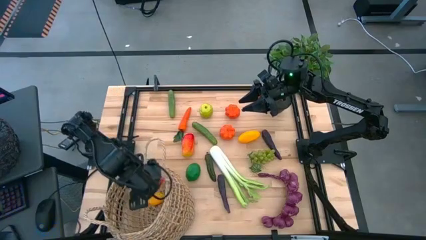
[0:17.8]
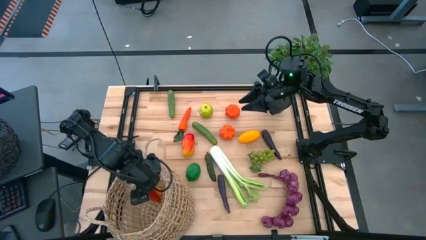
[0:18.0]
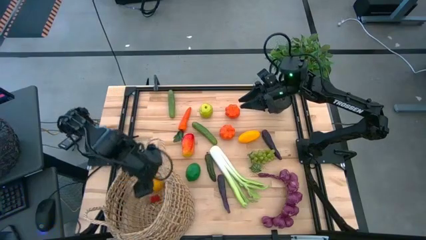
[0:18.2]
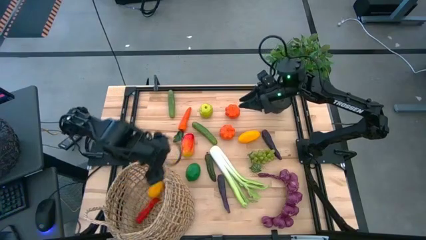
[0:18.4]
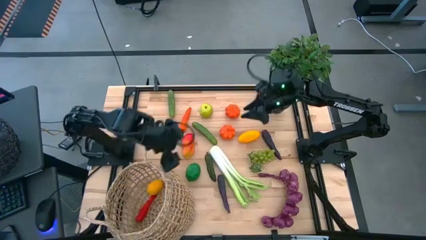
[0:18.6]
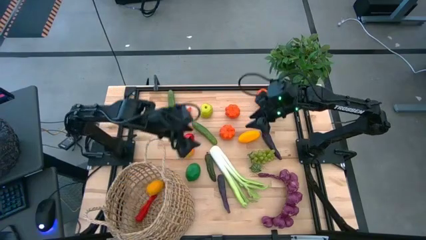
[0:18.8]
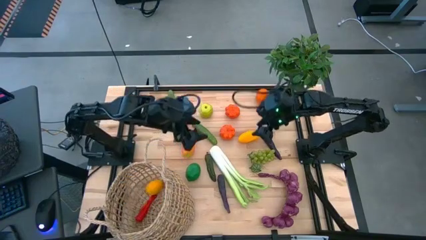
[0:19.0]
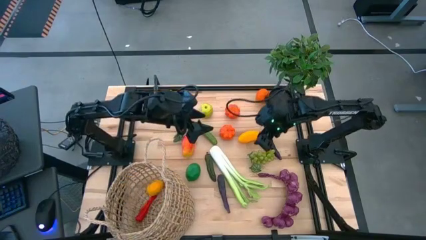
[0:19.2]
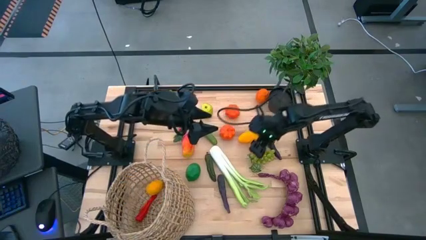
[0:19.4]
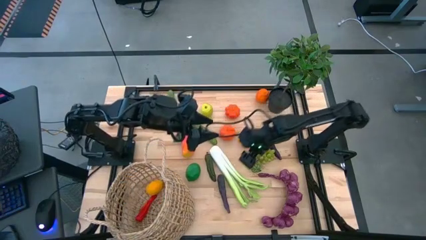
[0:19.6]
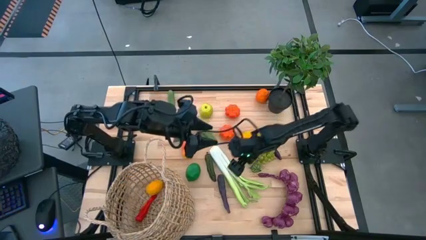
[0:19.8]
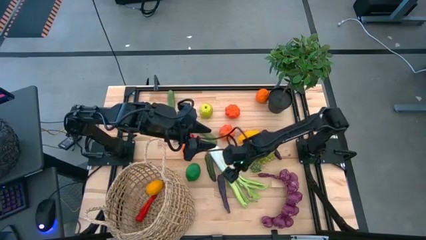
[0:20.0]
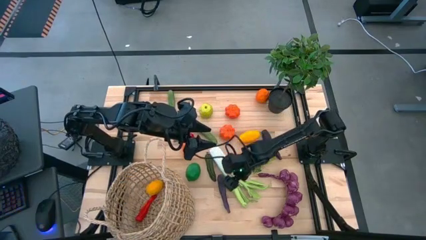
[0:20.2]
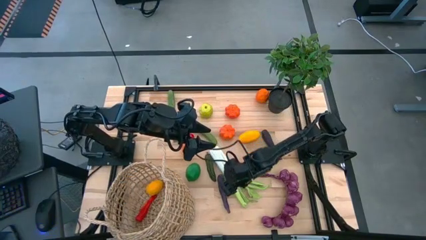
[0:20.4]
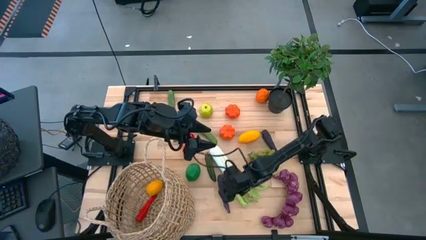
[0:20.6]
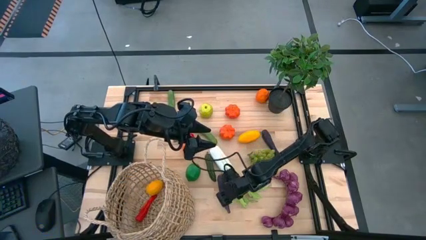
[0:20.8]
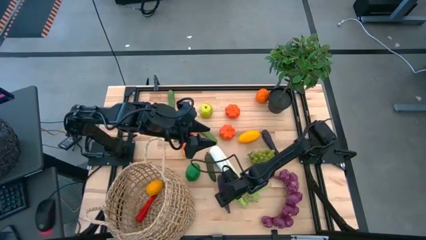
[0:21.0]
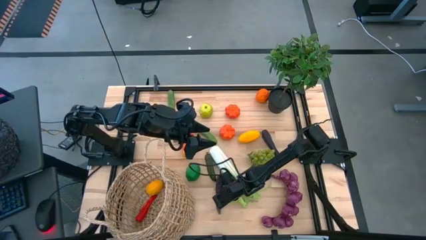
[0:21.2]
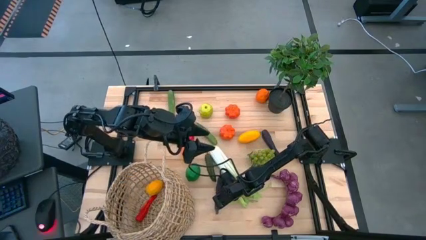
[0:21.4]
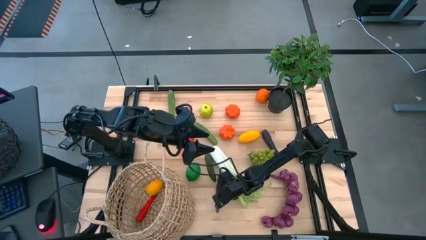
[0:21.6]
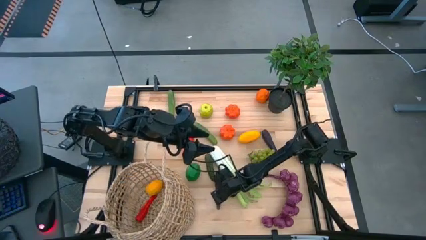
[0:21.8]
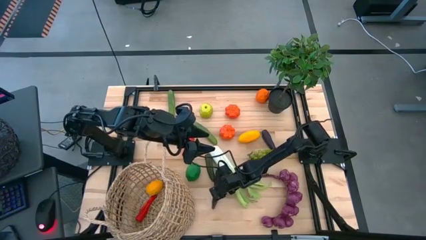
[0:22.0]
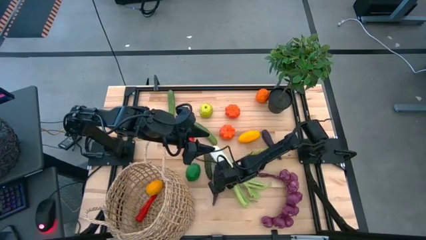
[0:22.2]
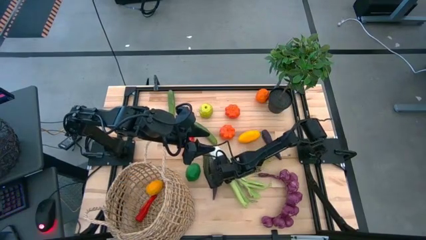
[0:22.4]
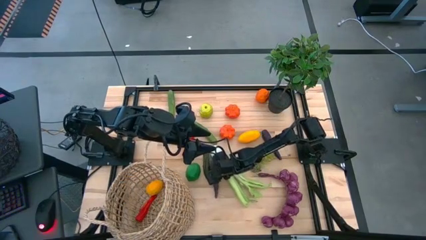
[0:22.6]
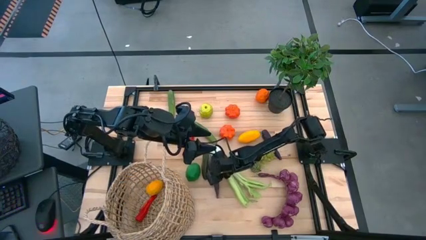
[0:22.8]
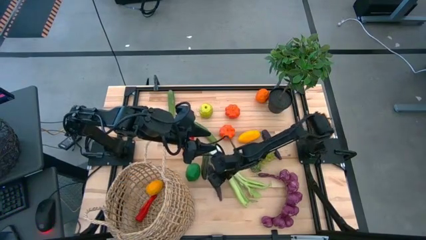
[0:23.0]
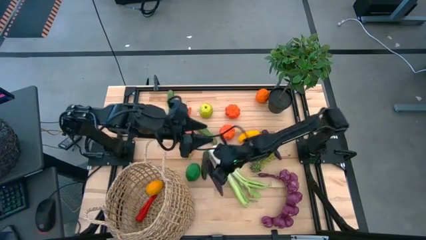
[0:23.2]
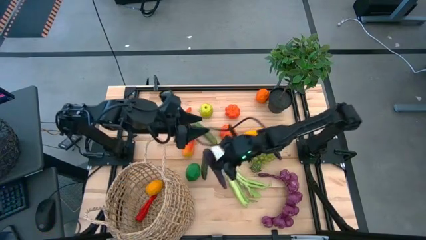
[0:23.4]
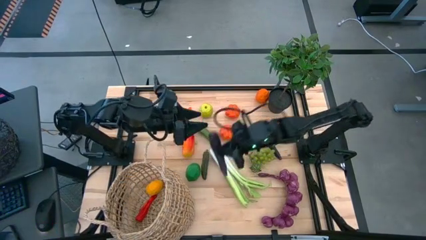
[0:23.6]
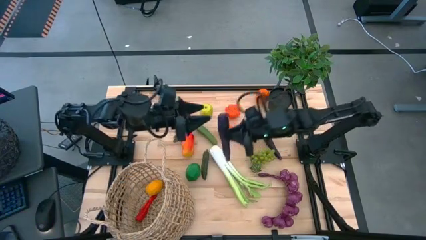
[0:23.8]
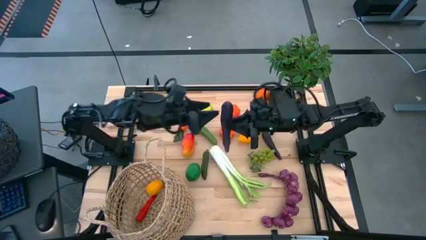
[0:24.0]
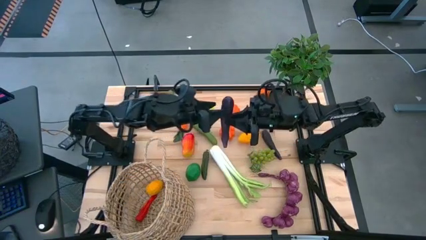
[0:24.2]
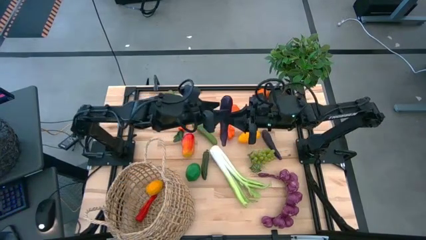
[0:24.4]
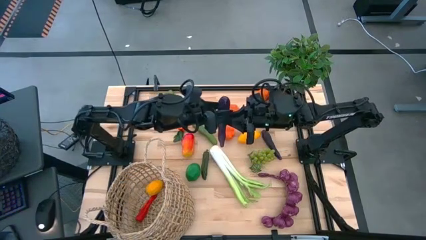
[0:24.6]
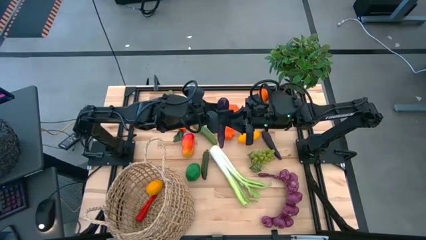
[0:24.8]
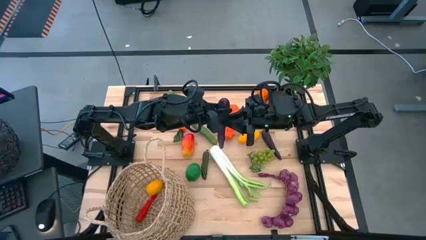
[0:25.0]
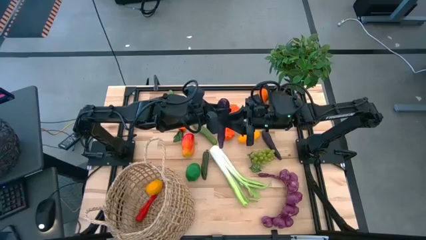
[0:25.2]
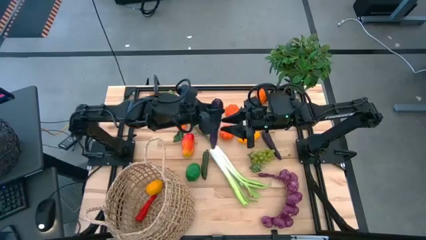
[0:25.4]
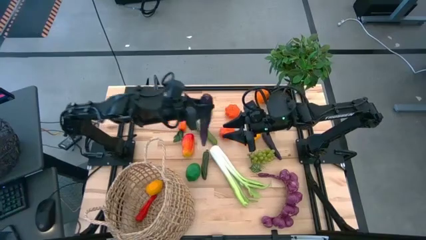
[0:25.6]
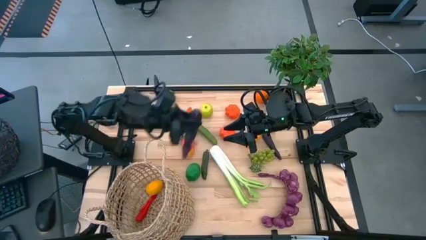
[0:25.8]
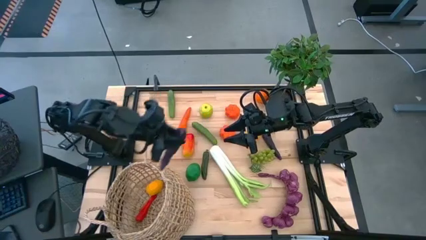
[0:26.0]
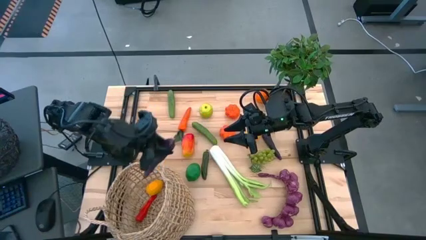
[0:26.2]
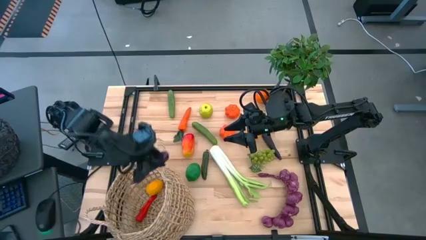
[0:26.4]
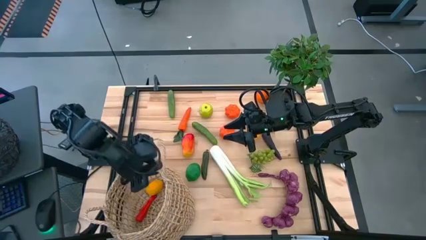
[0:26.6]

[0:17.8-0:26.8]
Task: Build produce basket
Put the bottom eggplant into the basket

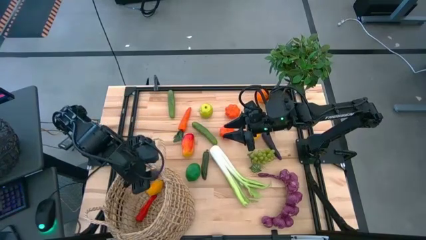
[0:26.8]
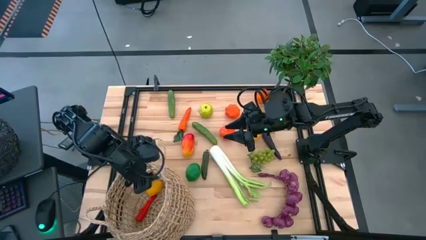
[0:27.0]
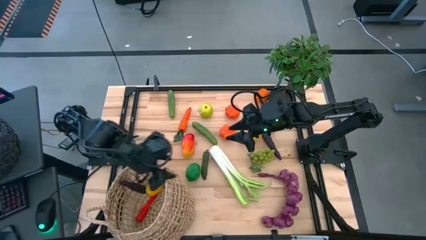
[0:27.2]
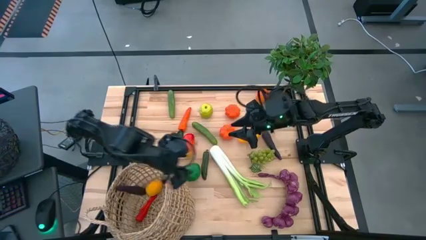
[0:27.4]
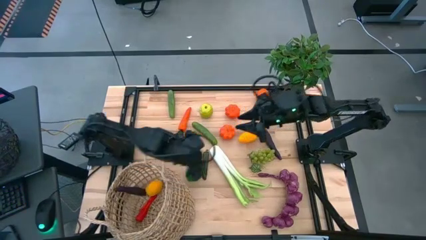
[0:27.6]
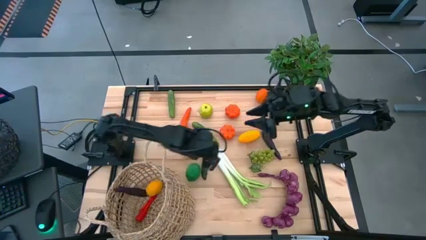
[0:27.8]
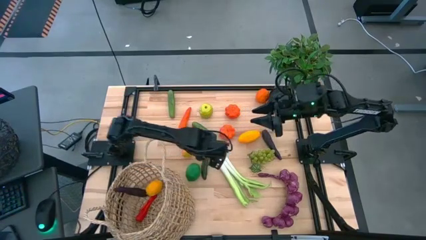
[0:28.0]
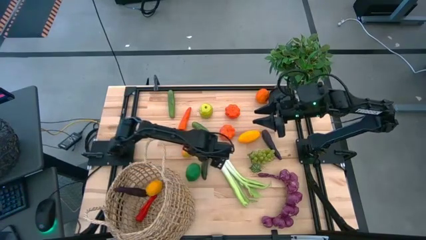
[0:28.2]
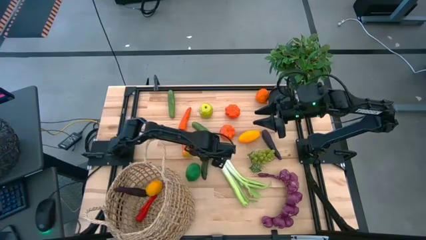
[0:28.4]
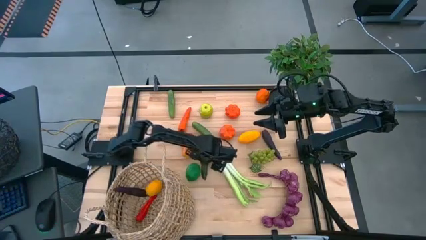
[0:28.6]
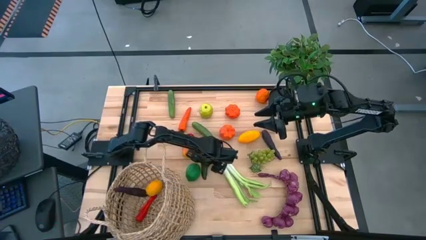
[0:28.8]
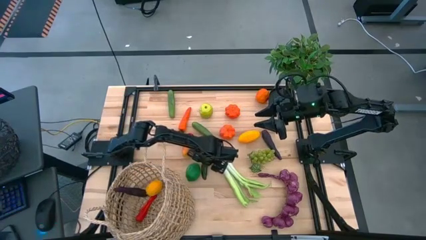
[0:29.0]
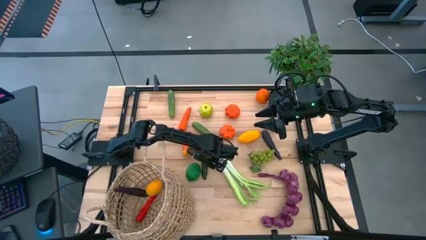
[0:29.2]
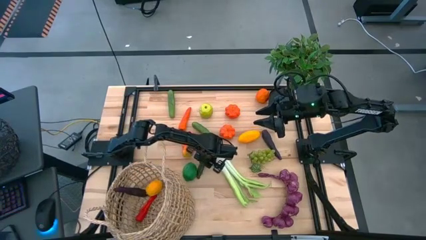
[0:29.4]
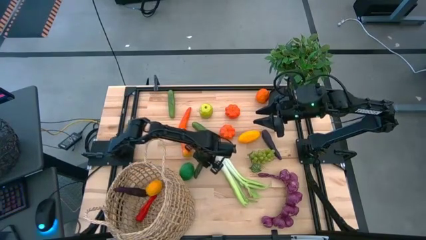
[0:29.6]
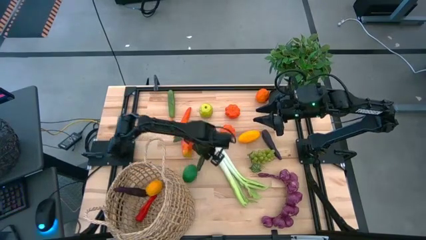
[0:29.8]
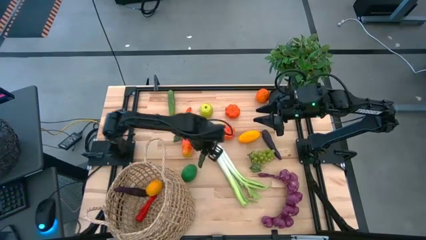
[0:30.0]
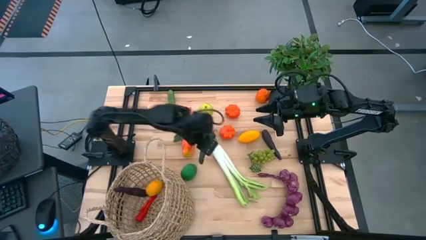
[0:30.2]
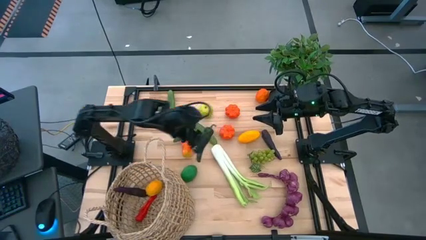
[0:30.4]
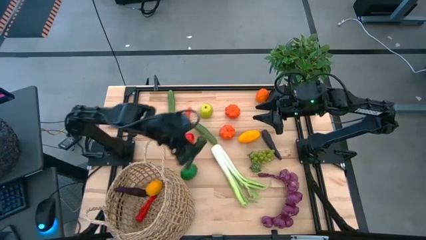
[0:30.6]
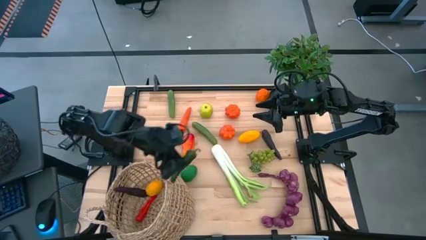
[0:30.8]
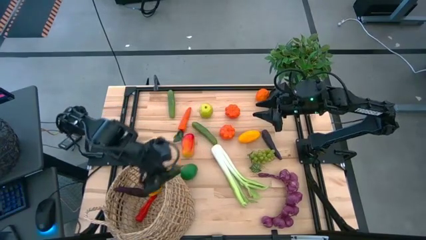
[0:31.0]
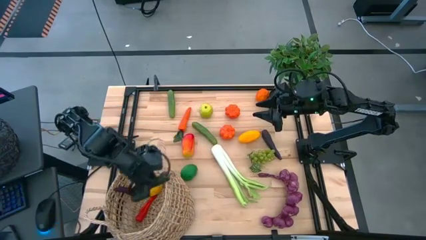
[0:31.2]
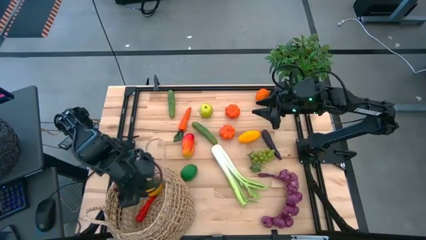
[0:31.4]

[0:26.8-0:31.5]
Put the green chili pepper into the basket

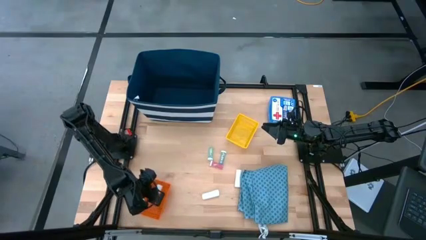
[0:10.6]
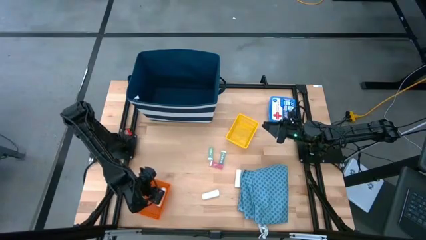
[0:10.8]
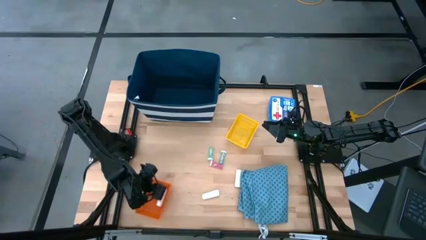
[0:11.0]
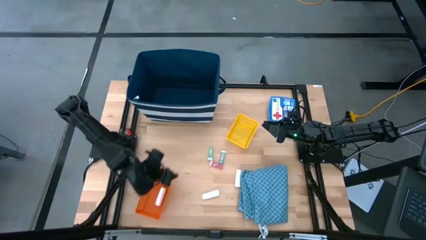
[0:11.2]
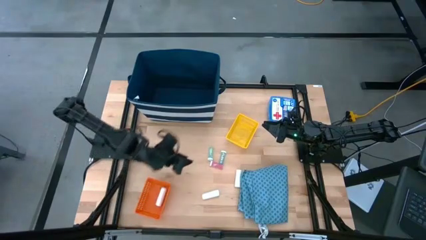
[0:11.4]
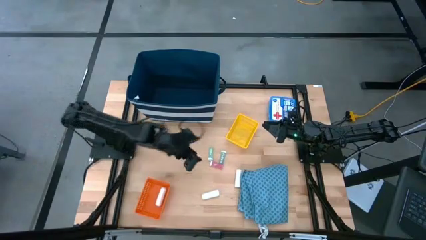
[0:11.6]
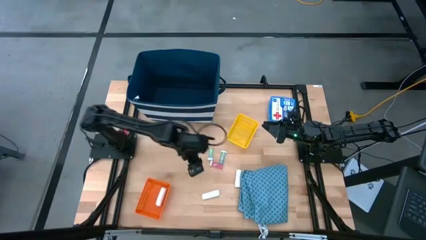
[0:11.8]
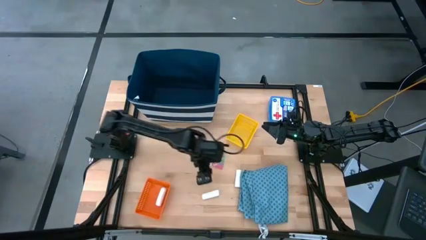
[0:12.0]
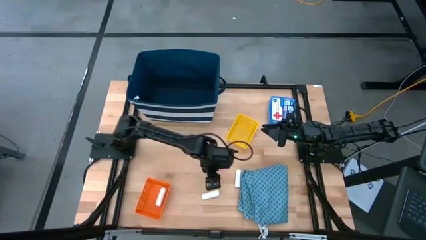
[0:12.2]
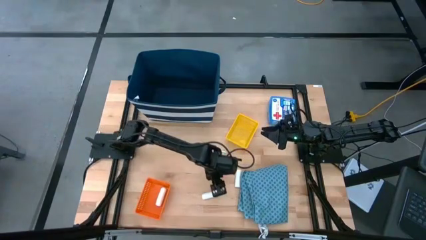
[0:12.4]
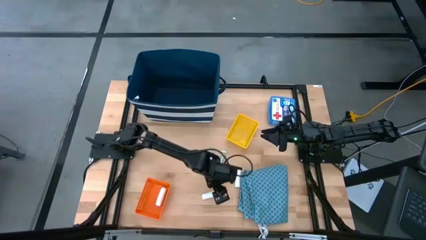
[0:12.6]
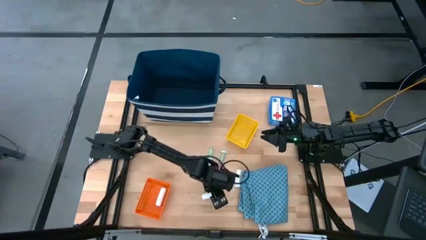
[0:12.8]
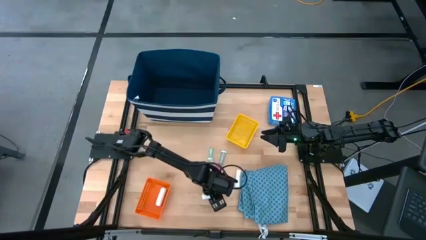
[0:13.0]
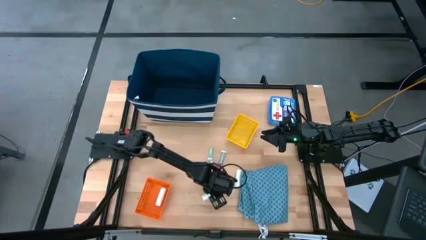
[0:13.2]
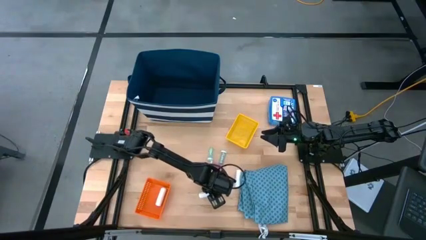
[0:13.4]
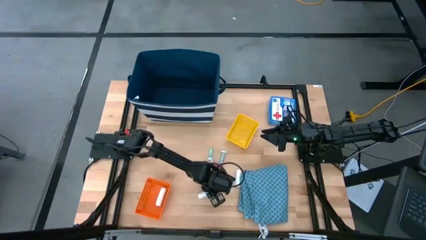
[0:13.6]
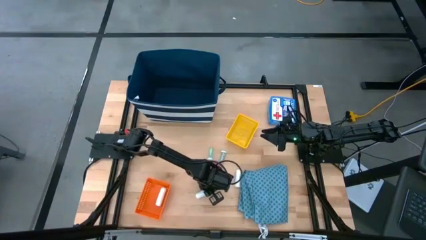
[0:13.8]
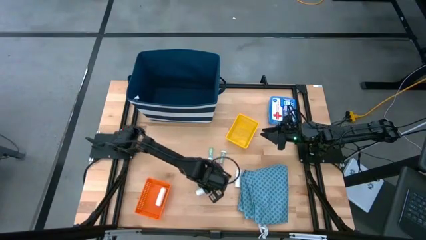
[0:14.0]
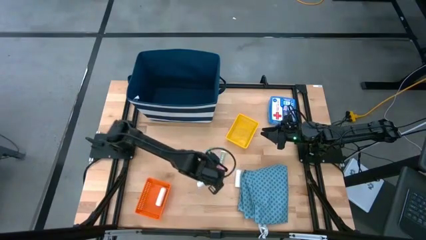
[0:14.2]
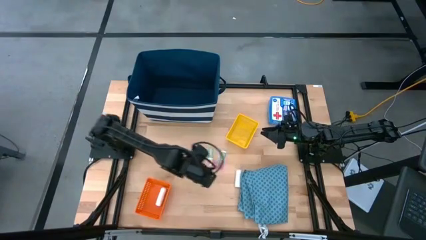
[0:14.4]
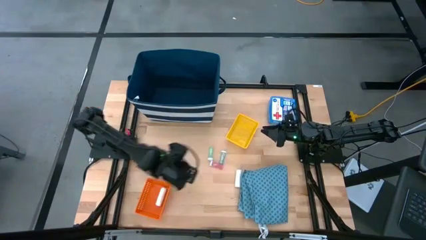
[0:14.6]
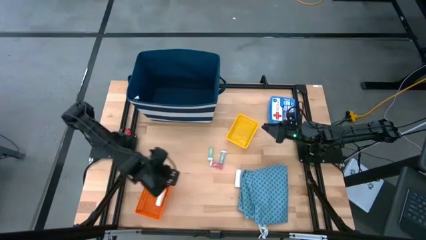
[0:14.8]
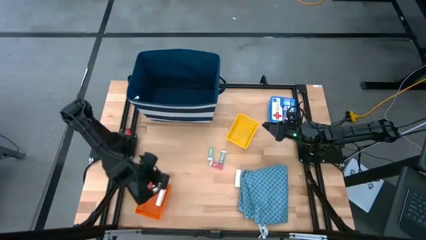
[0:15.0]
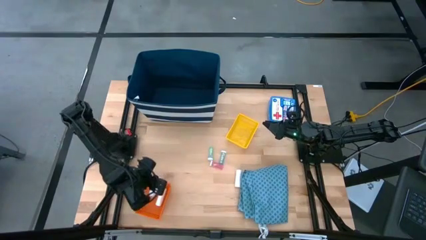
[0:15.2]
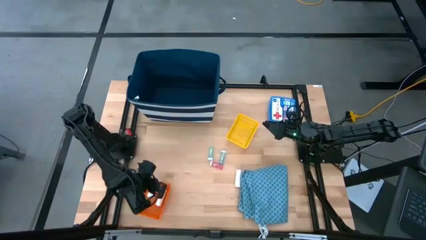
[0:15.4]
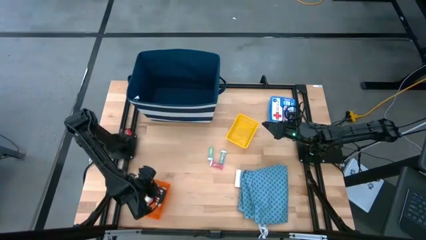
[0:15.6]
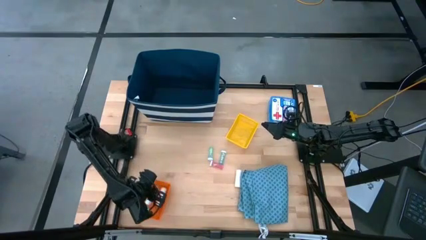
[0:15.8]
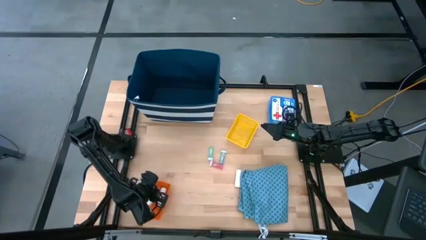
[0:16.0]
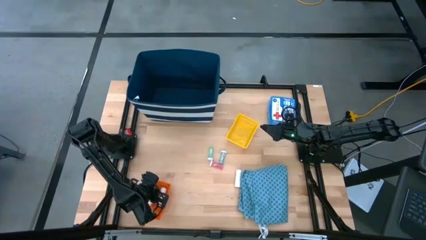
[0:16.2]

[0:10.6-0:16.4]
Task: Pick & place medical supplies in basket/bin
Put the bottom white gauze in the orange bin
